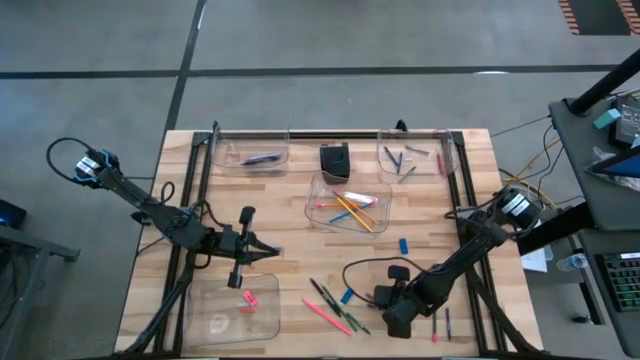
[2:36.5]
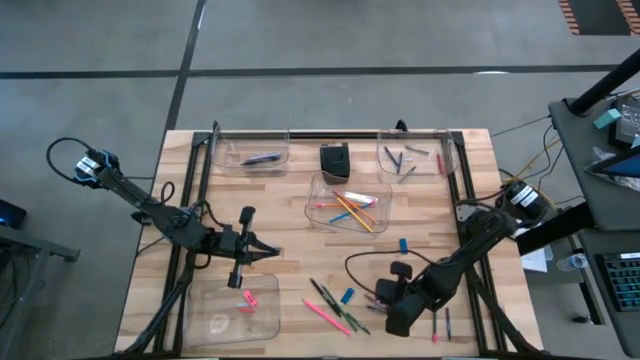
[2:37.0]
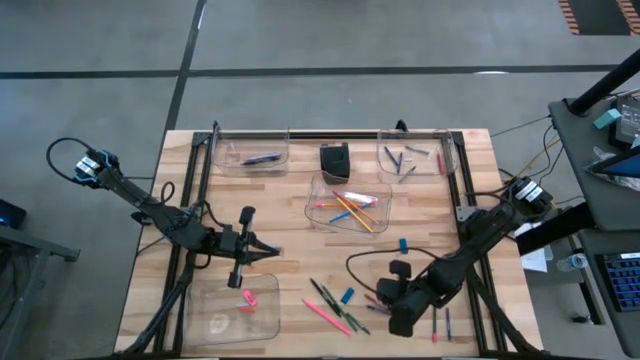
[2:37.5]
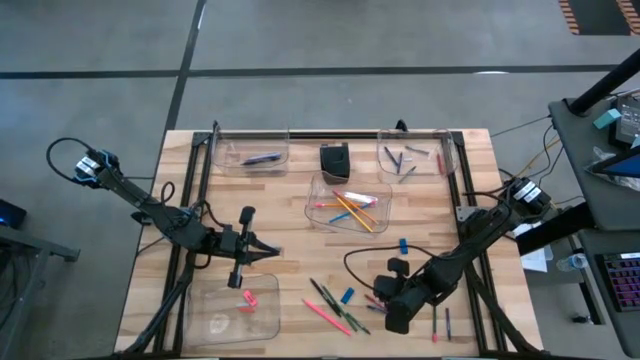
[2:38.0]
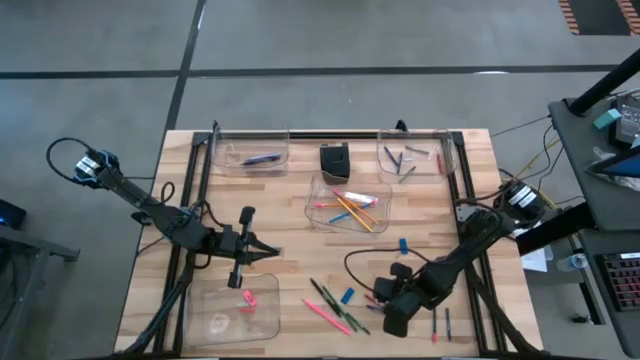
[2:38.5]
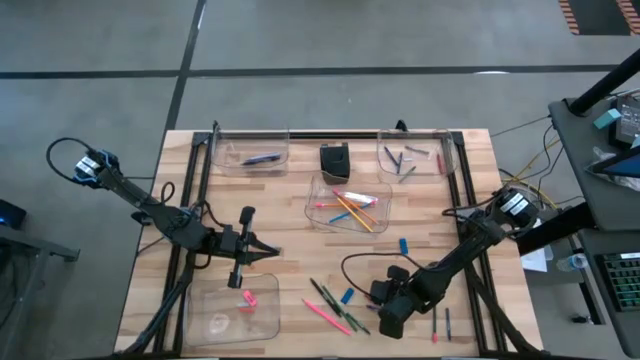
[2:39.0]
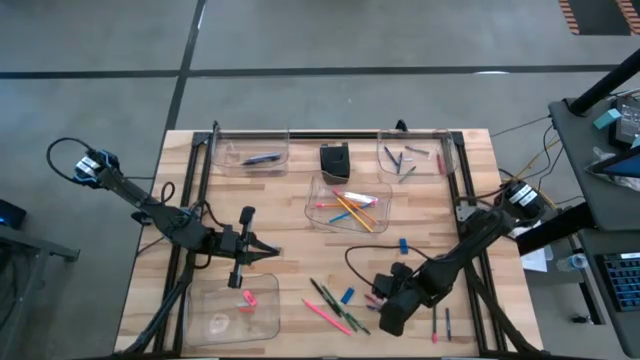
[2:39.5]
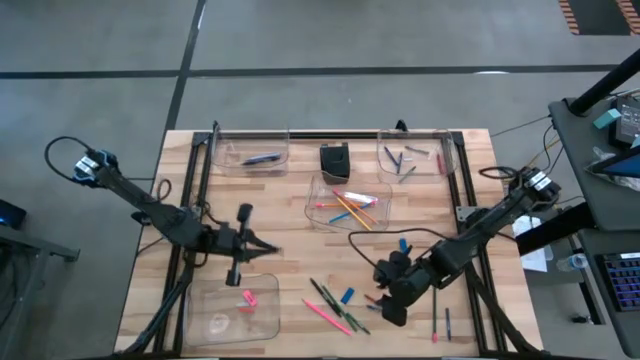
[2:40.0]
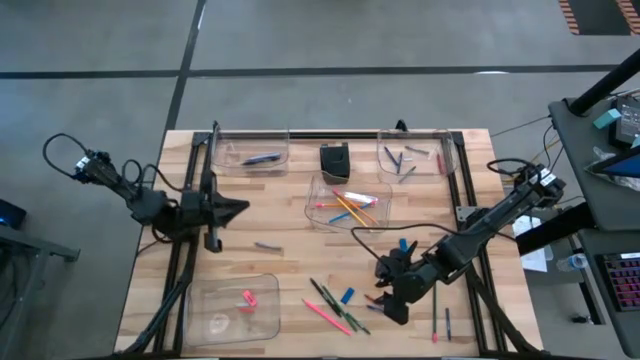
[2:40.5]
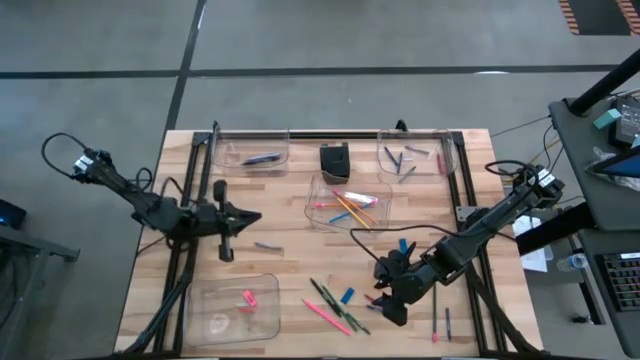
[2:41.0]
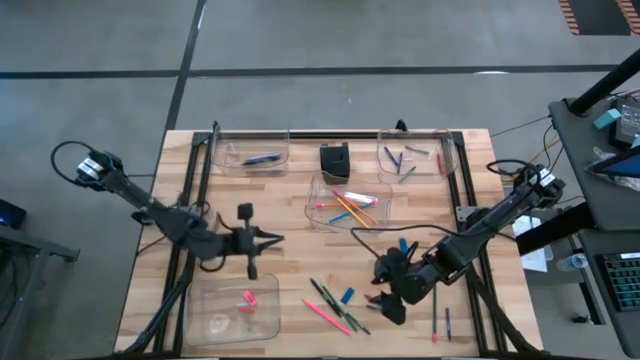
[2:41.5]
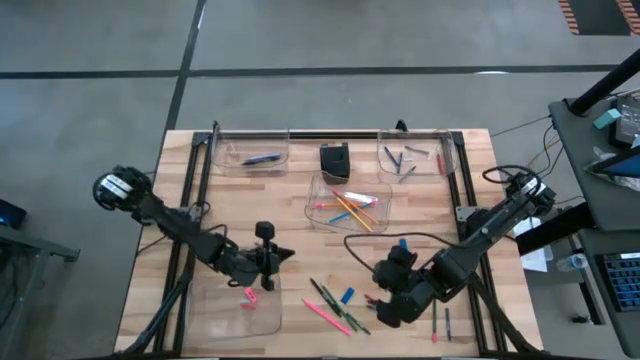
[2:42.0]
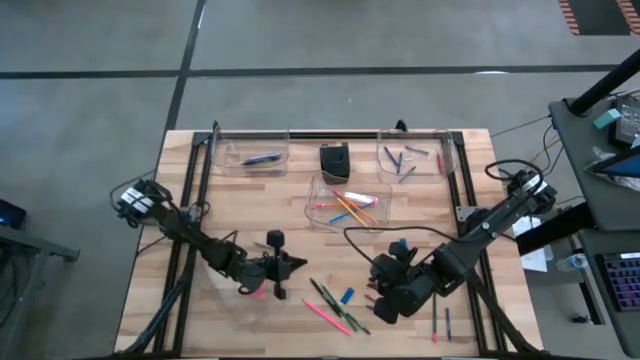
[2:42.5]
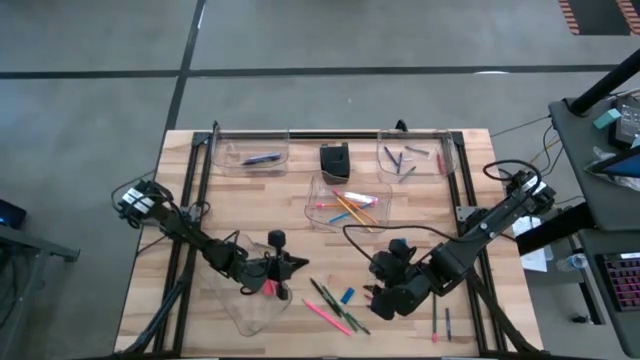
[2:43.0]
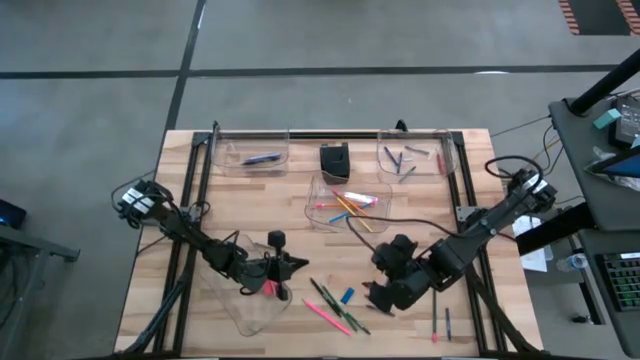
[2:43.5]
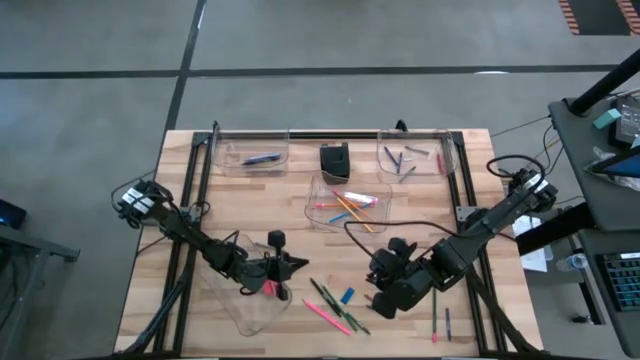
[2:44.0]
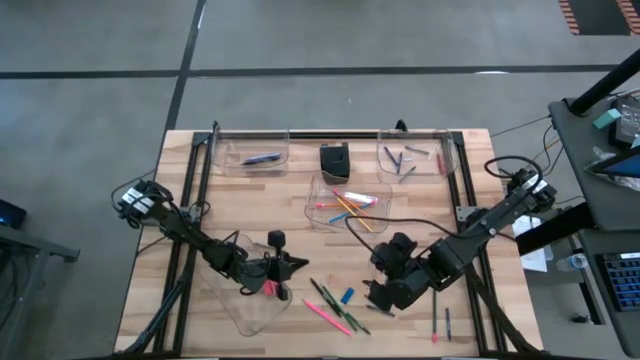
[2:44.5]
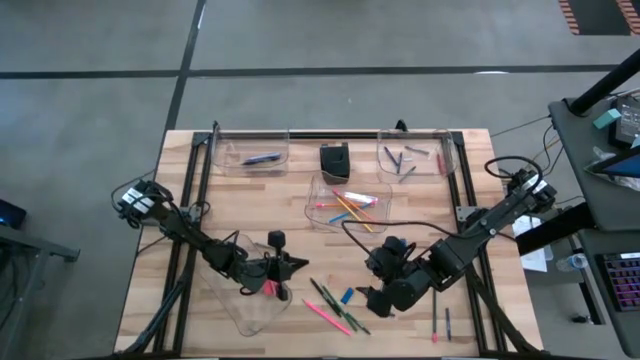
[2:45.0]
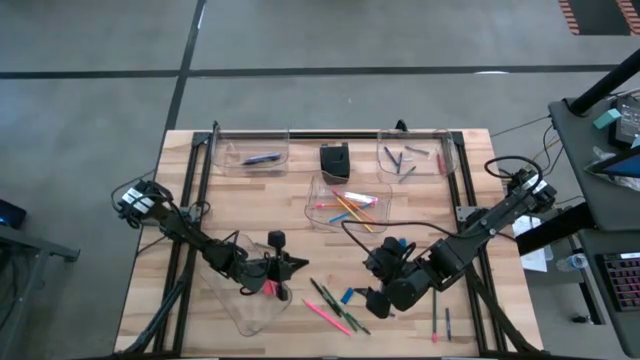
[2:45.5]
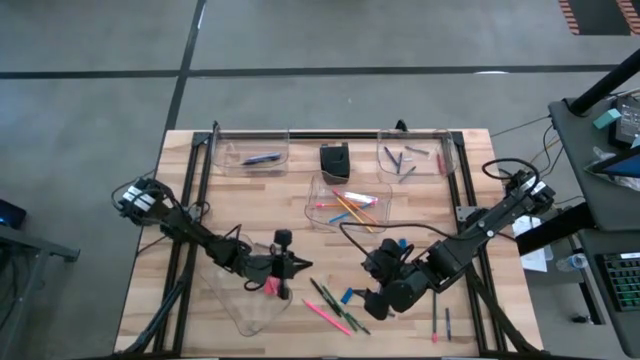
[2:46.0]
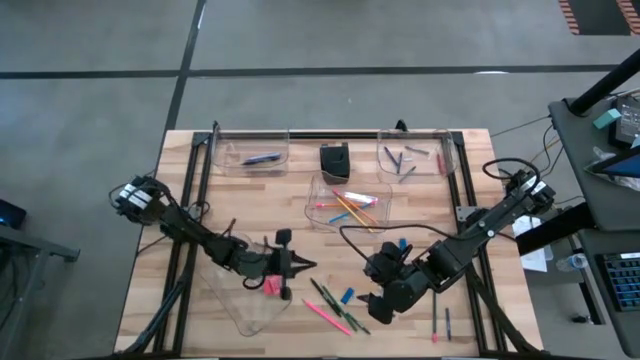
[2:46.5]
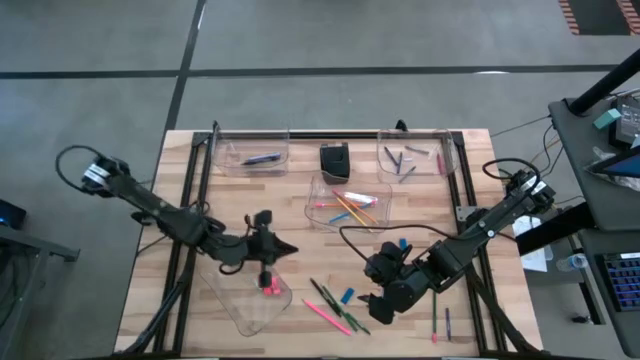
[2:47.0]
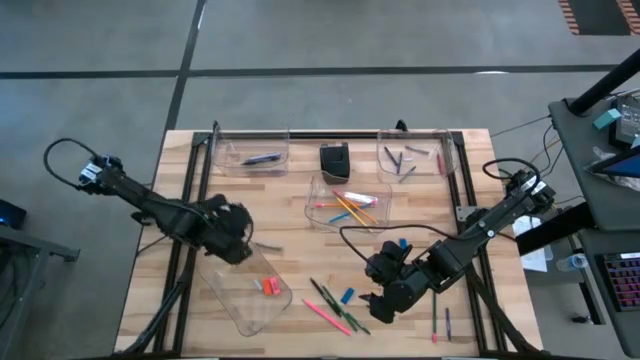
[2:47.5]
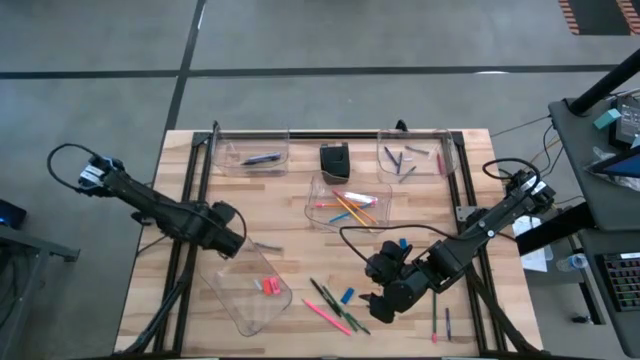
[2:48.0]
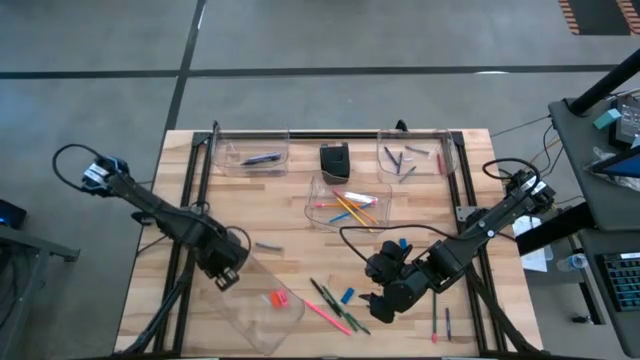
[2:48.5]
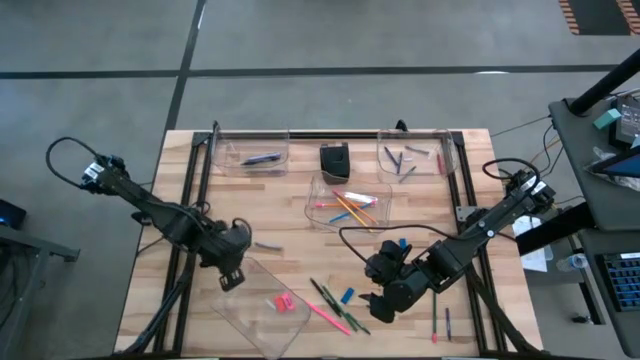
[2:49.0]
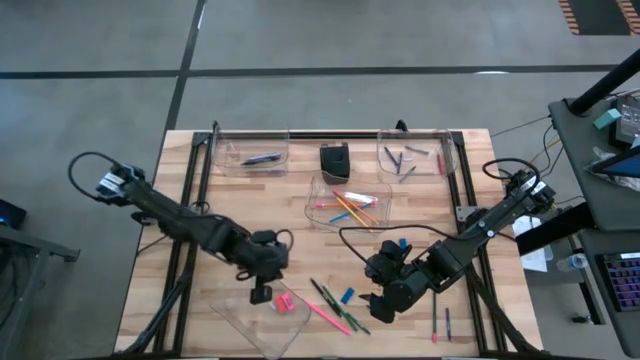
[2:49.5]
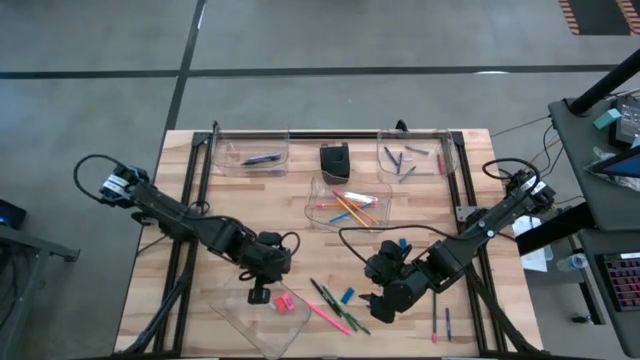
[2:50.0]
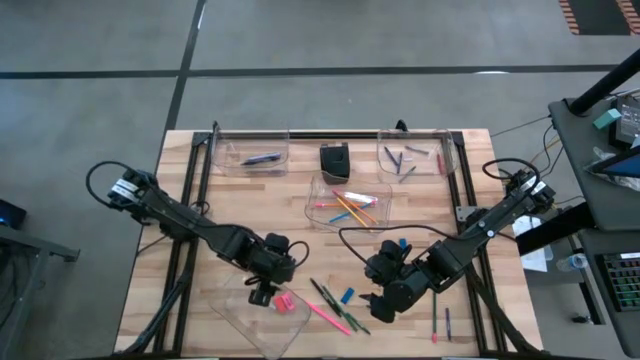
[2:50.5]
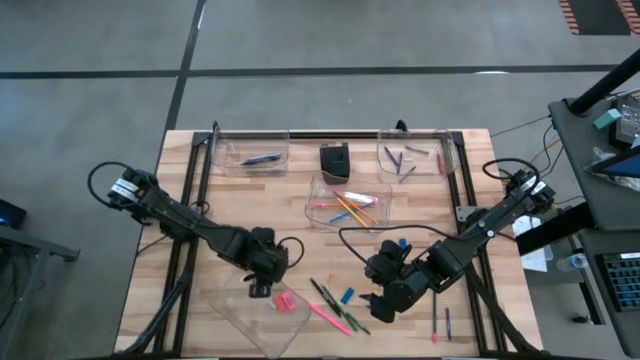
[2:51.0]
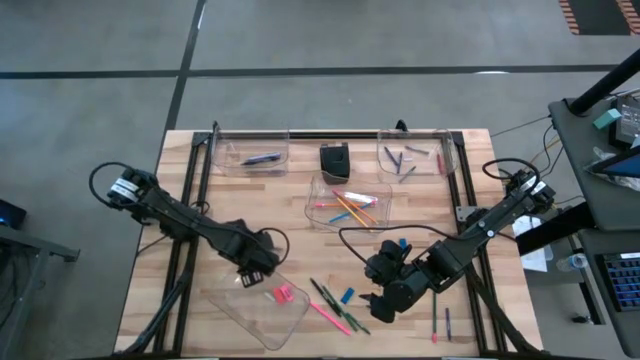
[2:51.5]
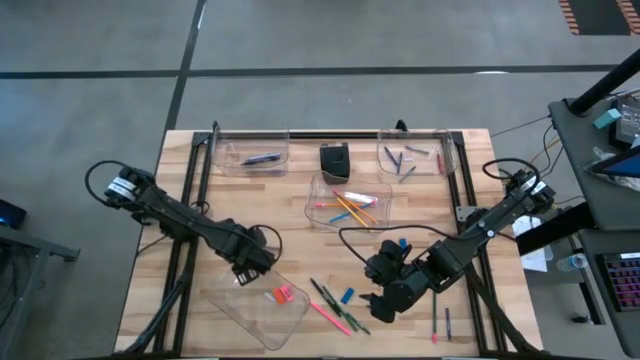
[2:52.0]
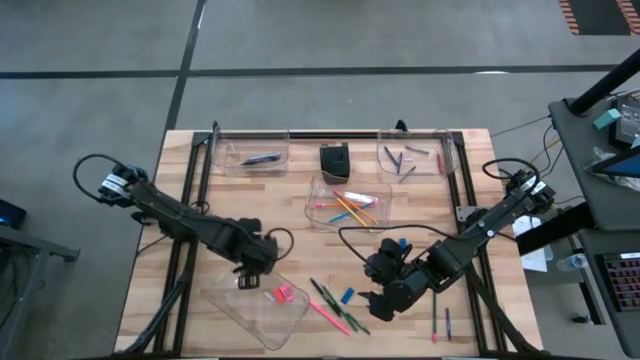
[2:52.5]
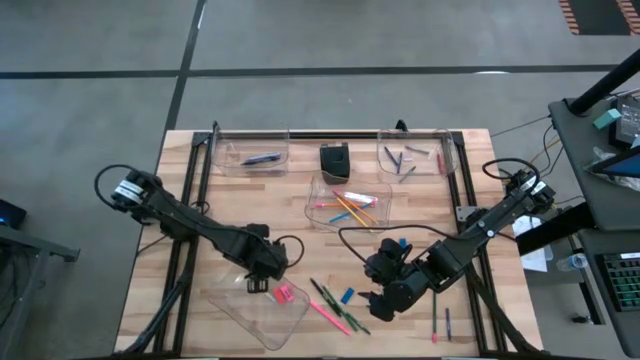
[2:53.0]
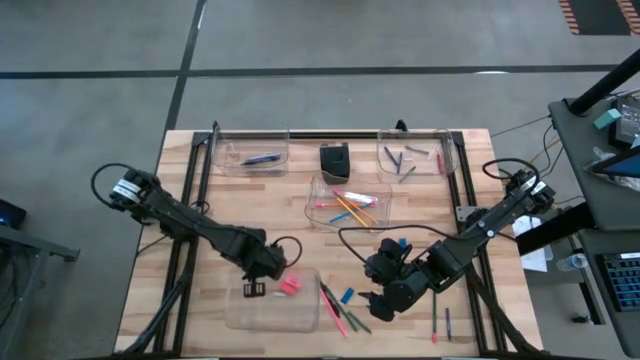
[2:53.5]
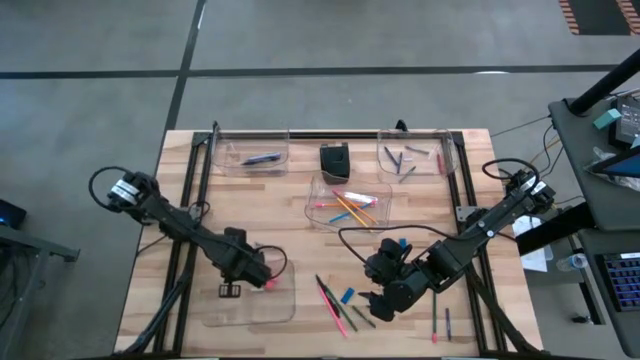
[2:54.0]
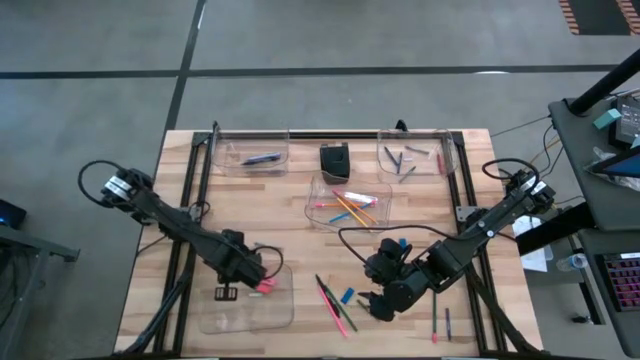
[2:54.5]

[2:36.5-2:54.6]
Task: Sort crayons/erasers/pens/pencils in bins
Adjust the bottom transparent bin

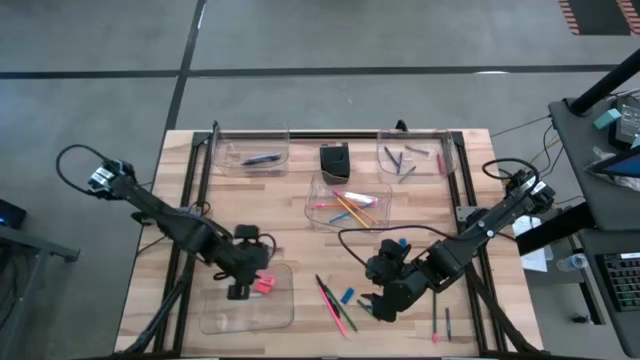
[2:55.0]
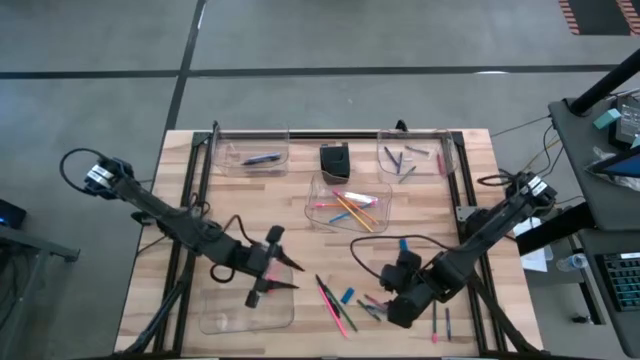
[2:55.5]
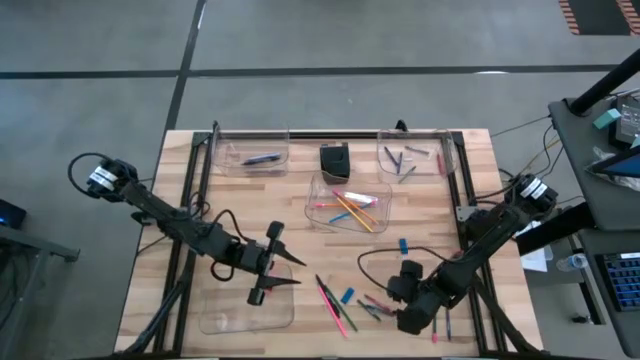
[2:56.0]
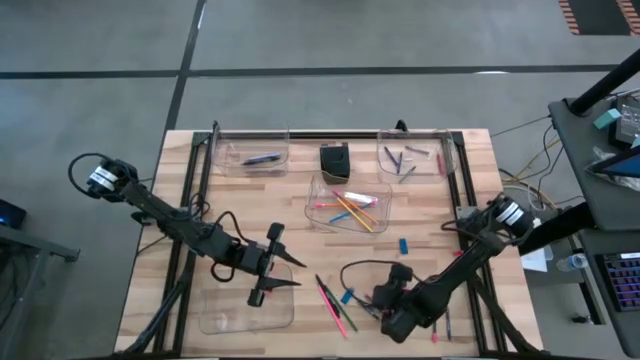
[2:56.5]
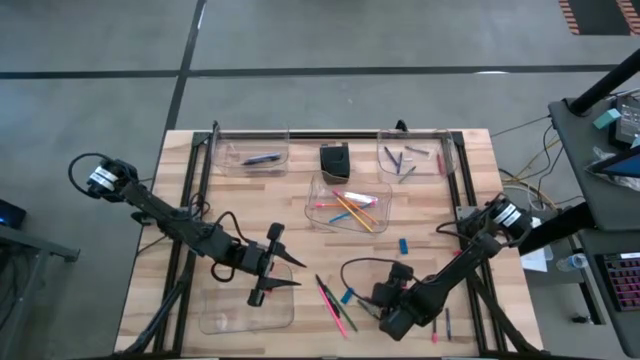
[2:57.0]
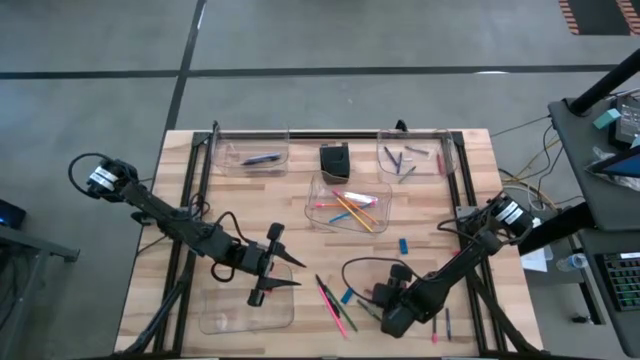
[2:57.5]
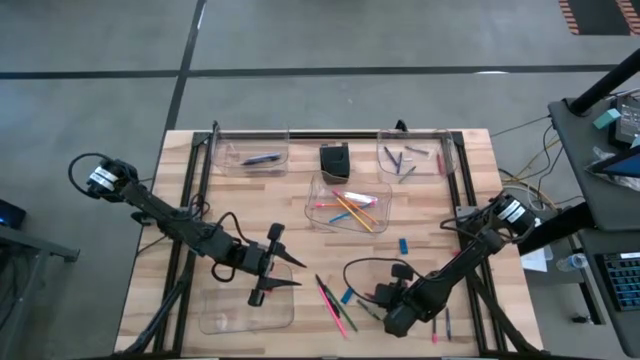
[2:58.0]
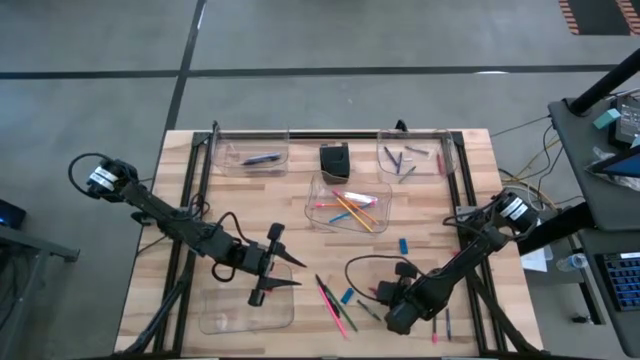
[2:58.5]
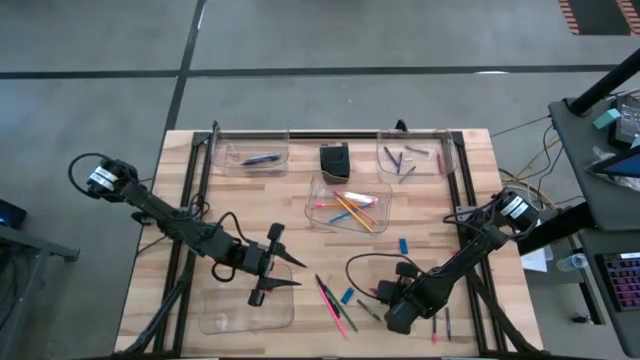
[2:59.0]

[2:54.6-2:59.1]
Put the blue crayon into the top right transparent bin
